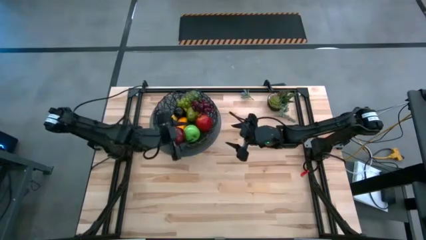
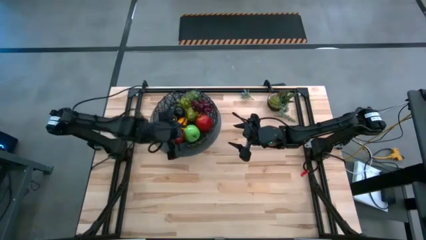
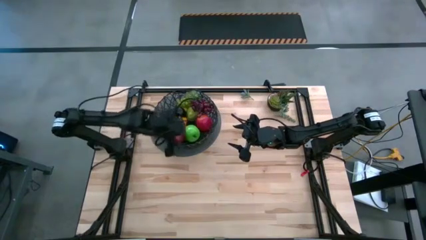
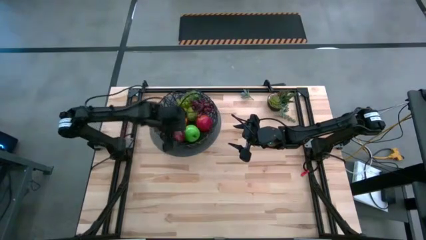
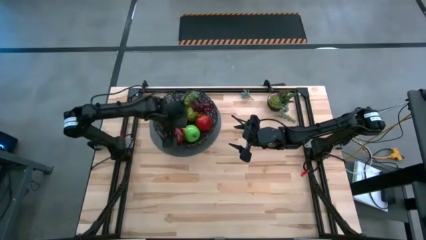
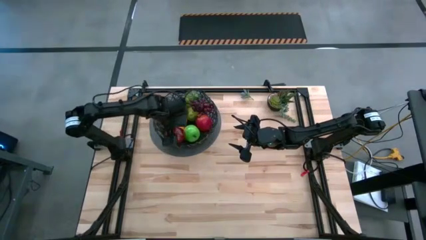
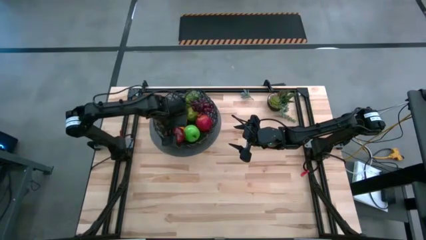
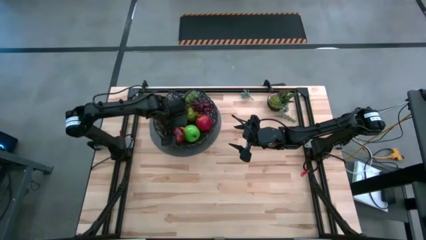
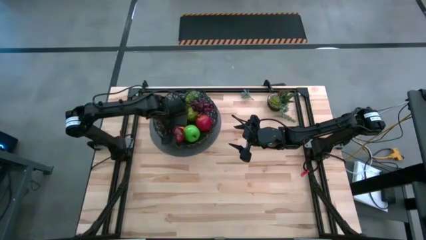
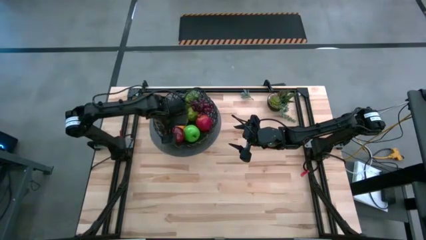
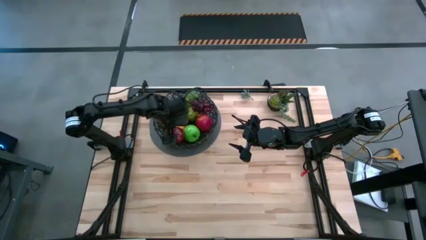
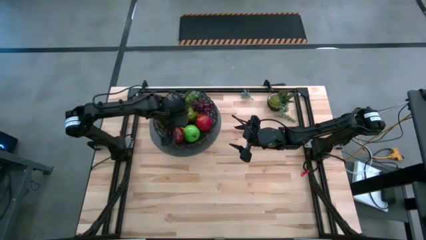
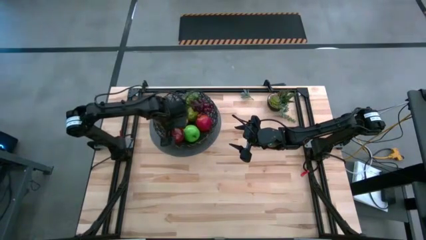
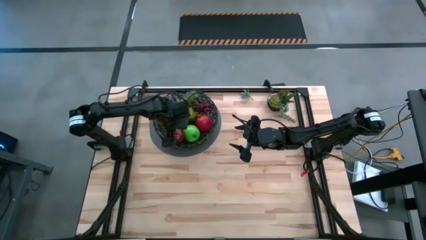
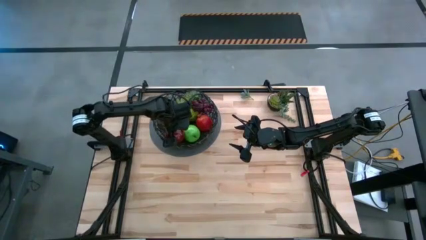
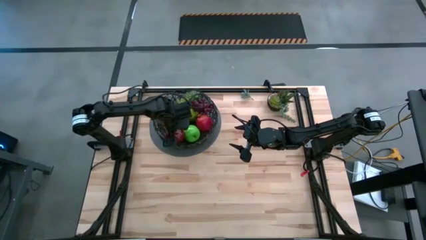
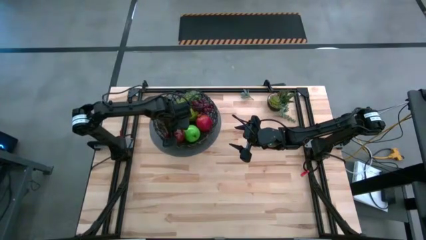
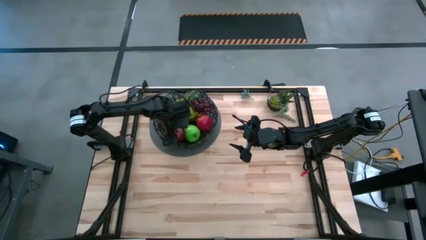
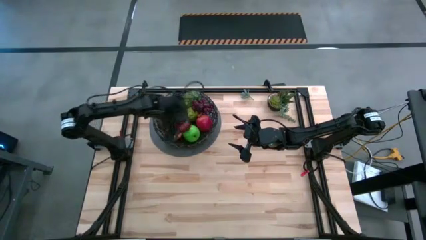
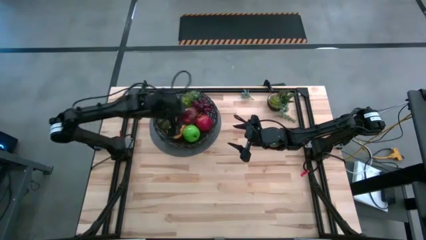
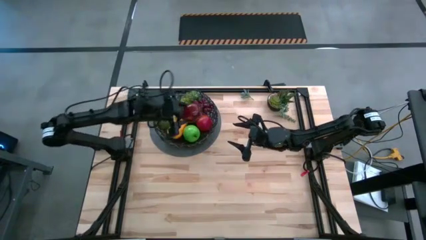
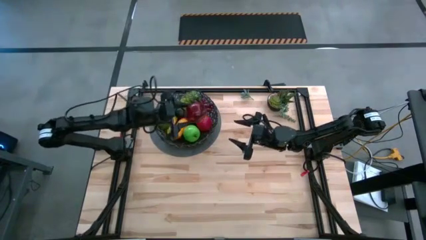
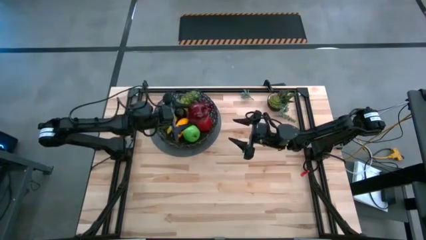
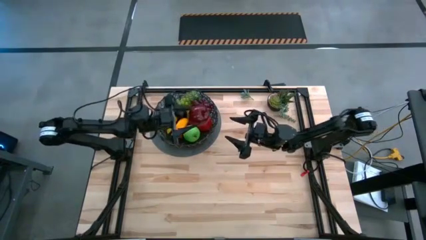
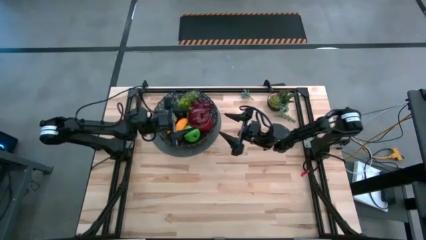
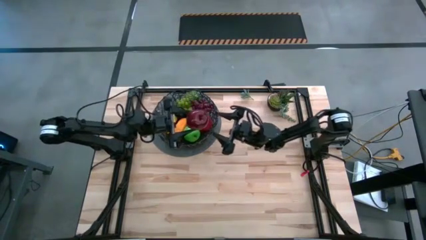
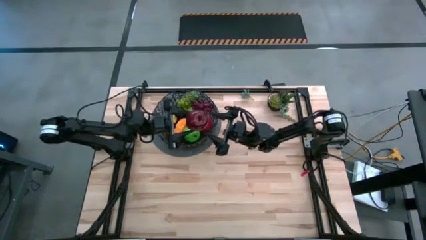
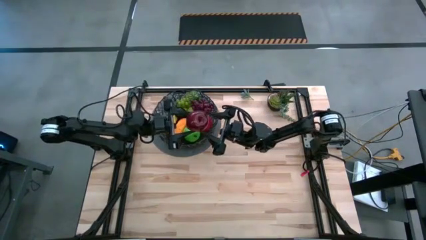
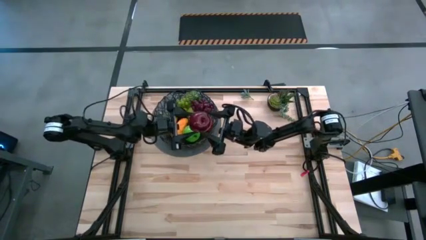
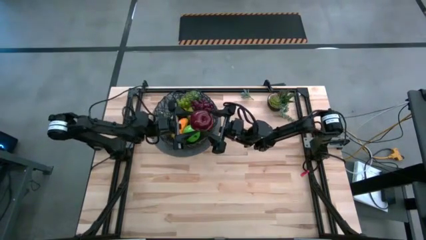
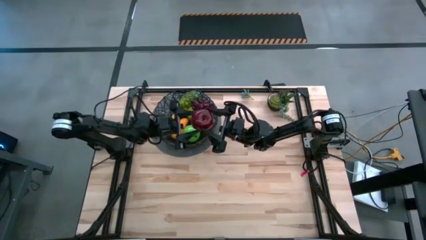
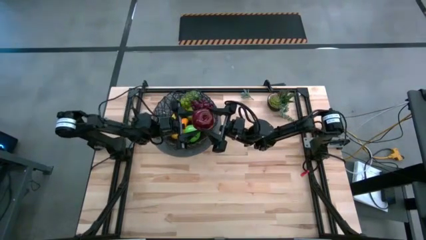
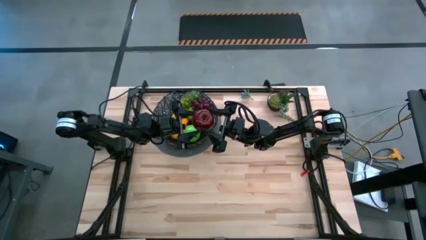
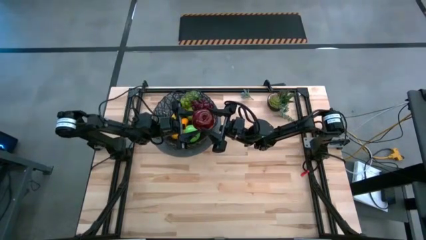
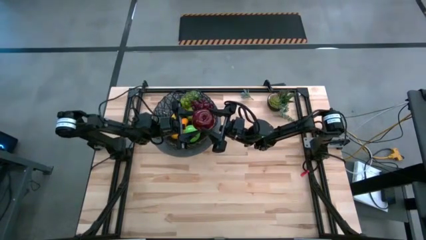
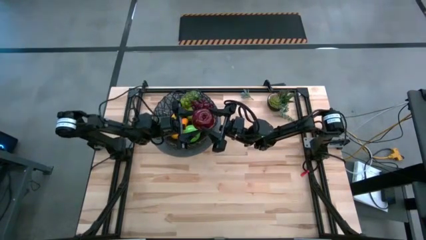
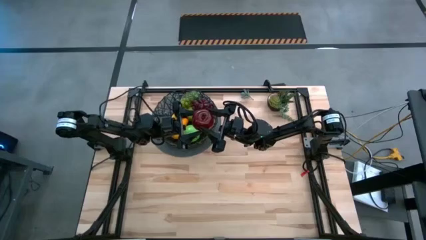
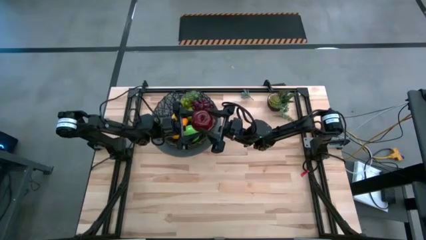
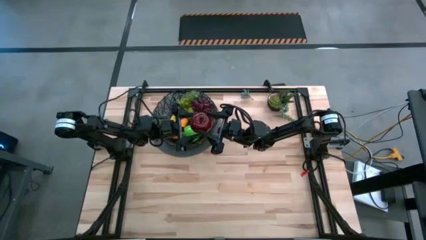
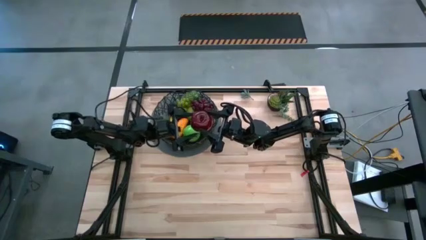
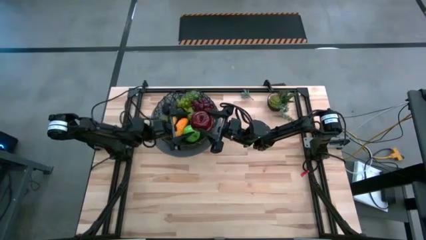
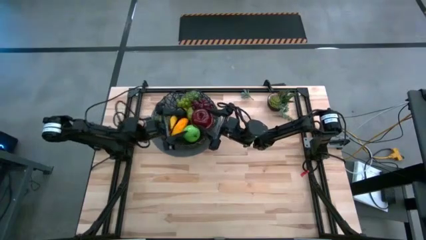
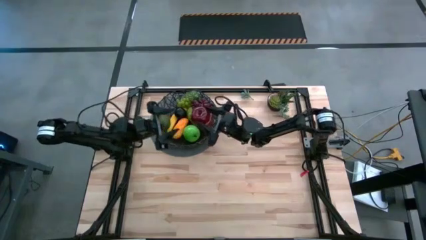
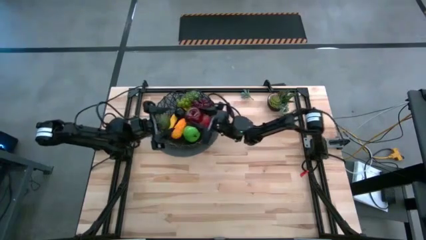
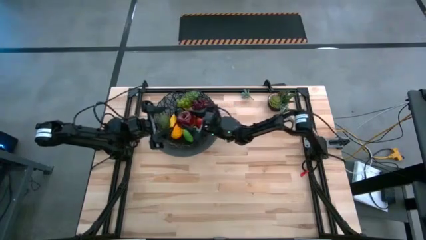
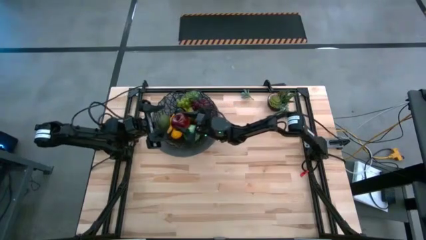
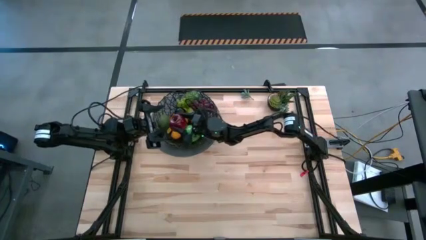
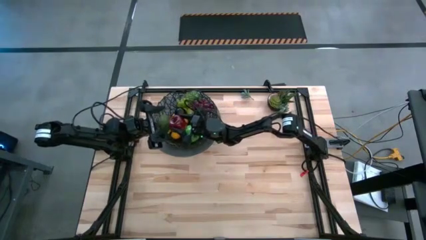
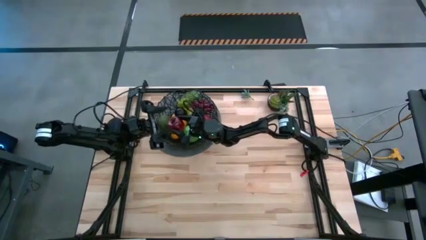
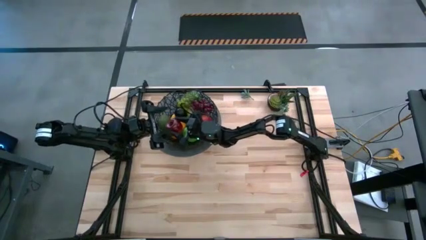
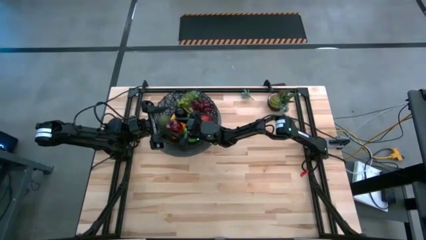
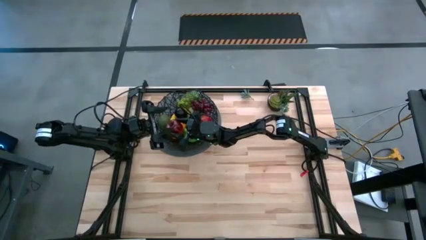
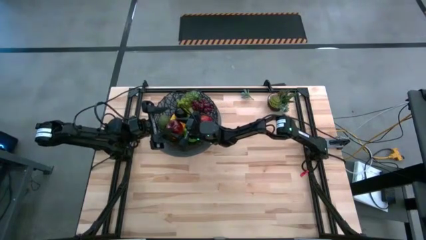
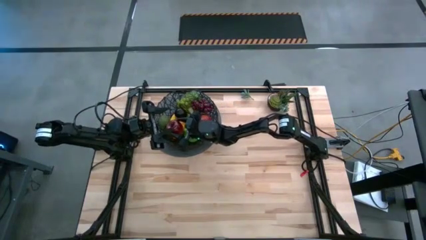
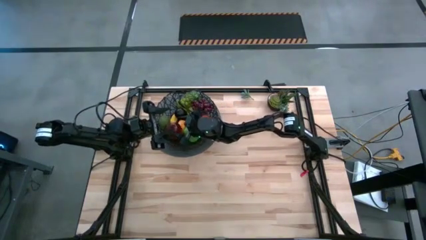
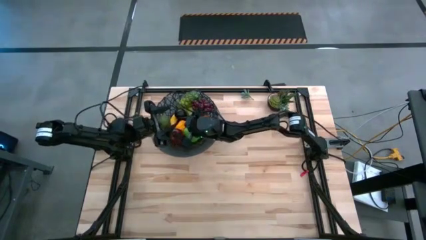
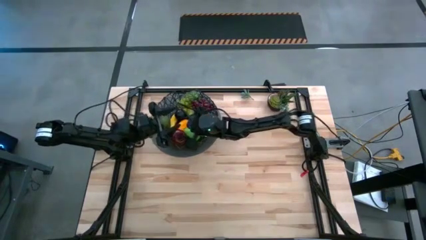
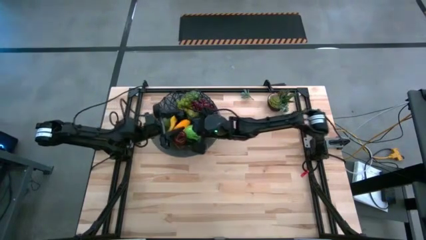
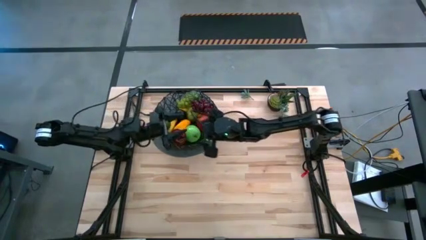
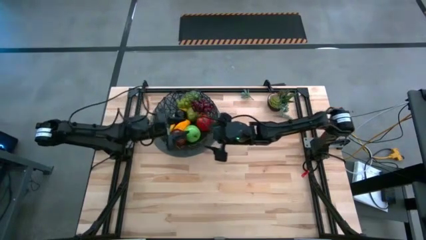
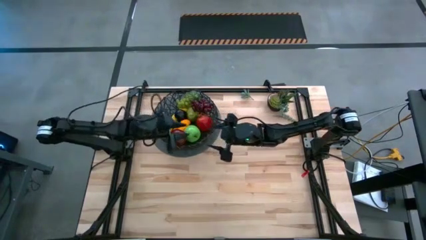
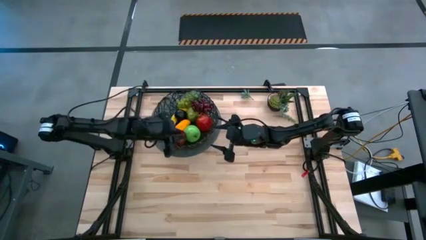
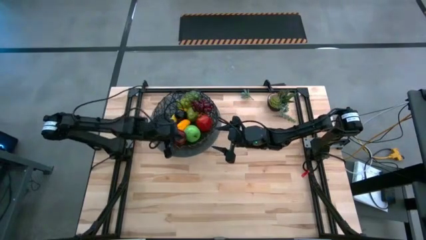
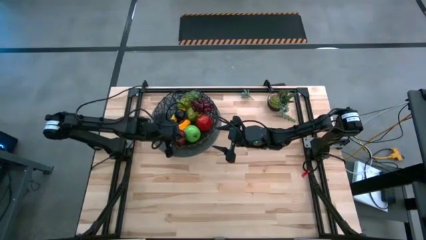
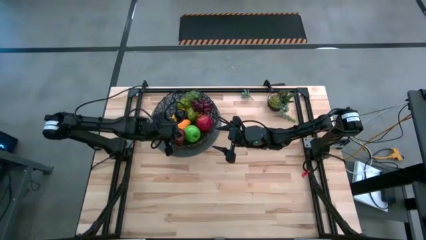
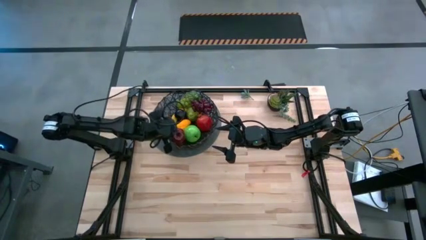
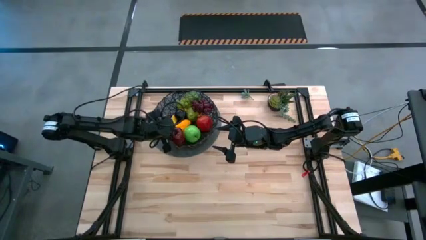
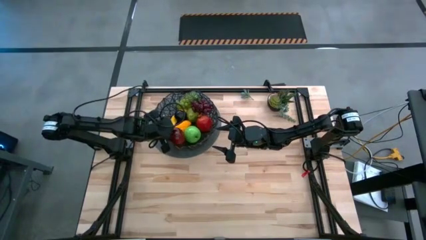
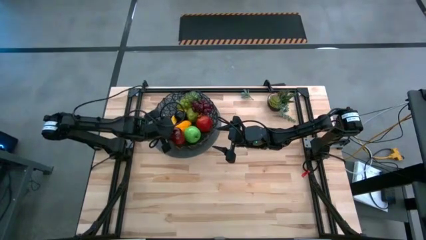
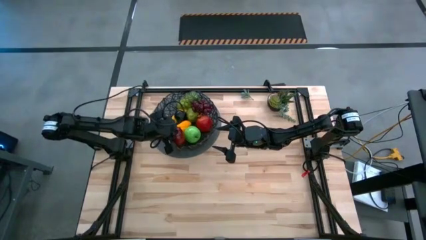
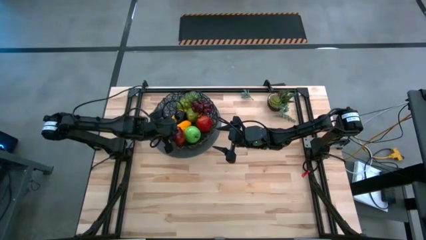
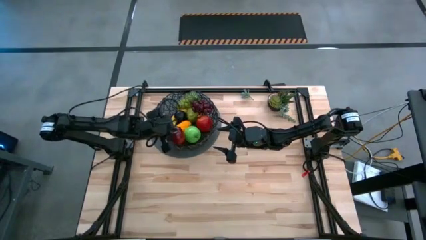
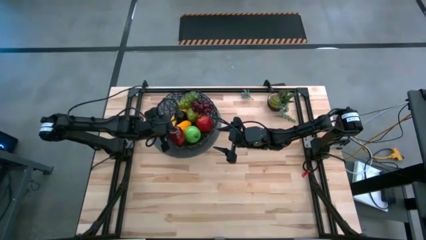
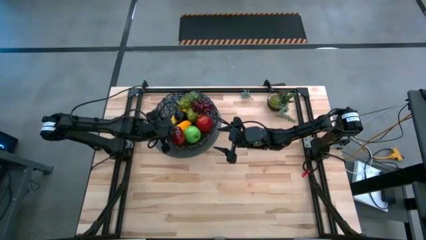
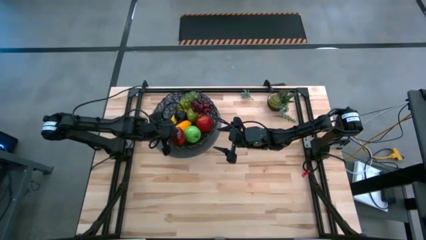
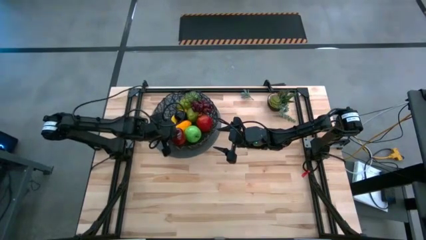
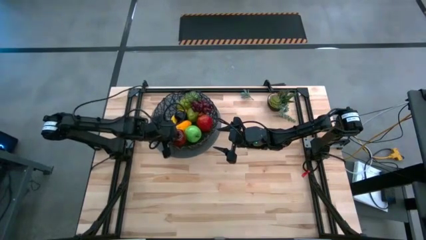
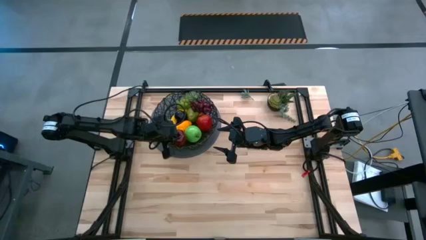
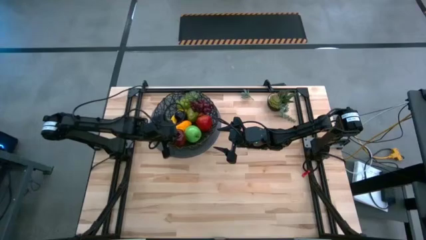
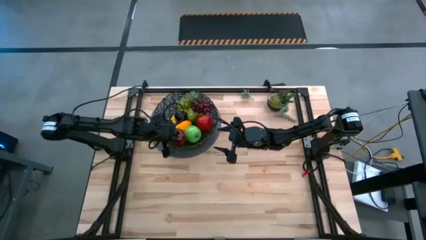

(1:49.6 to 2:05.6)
Task: Build produce basket
Put the red apple into the basket
